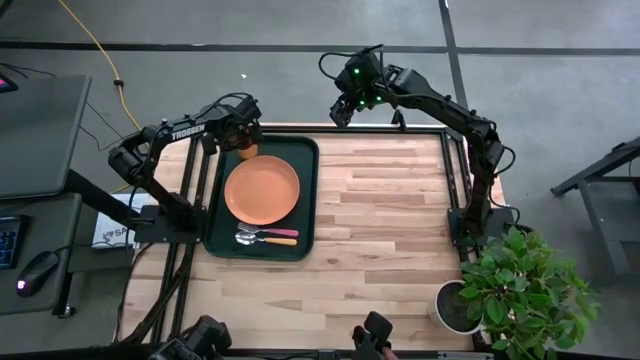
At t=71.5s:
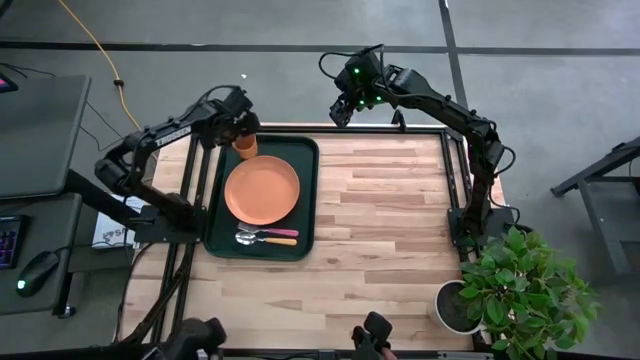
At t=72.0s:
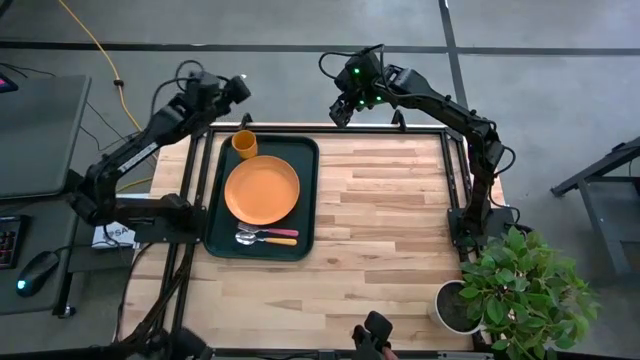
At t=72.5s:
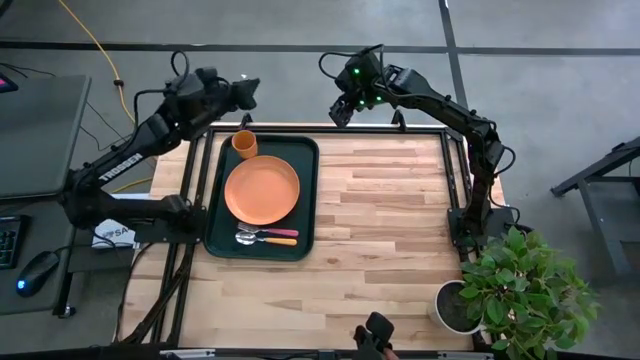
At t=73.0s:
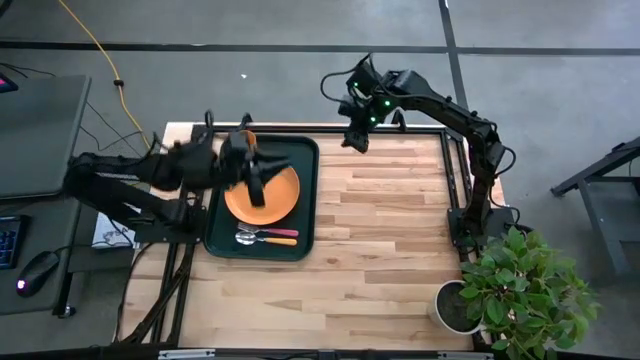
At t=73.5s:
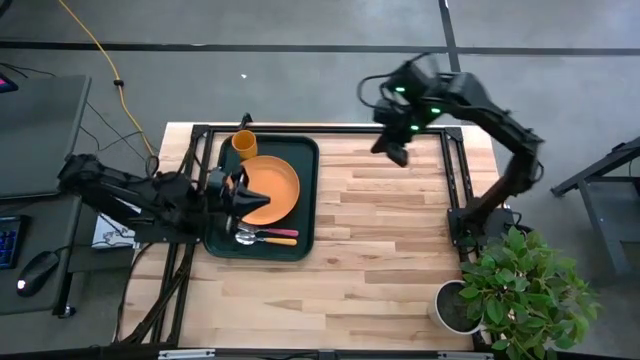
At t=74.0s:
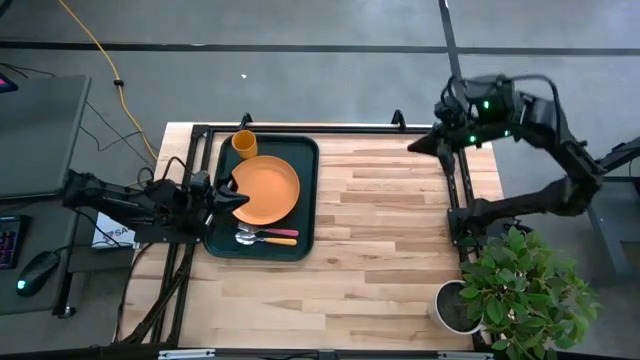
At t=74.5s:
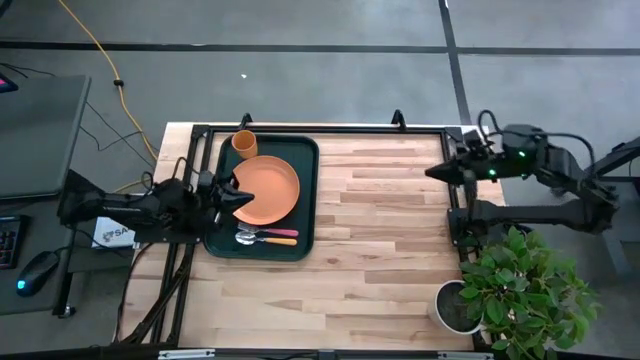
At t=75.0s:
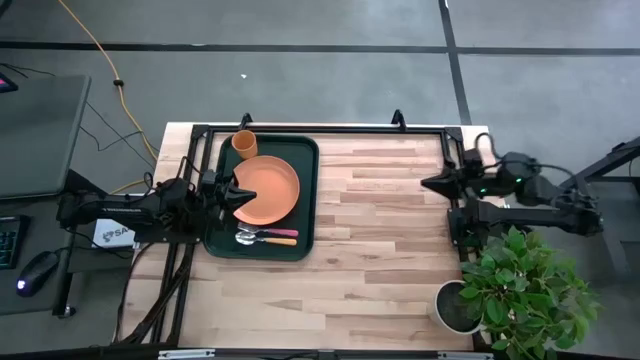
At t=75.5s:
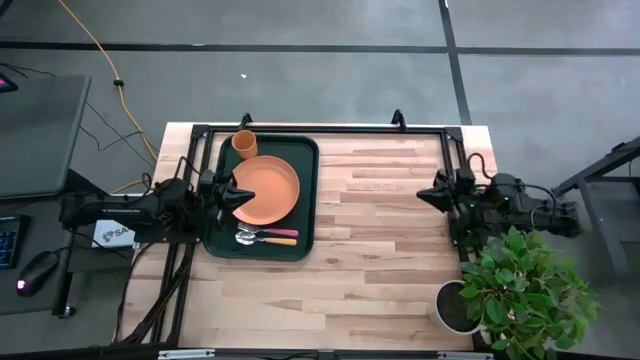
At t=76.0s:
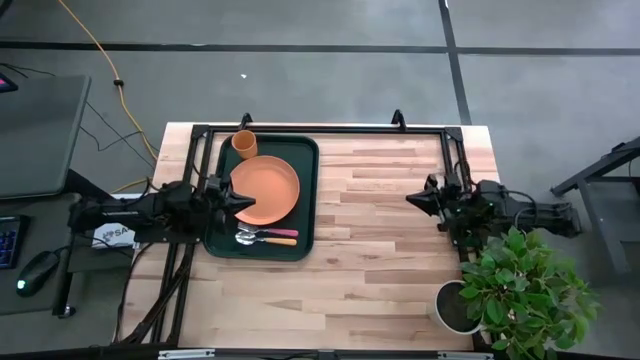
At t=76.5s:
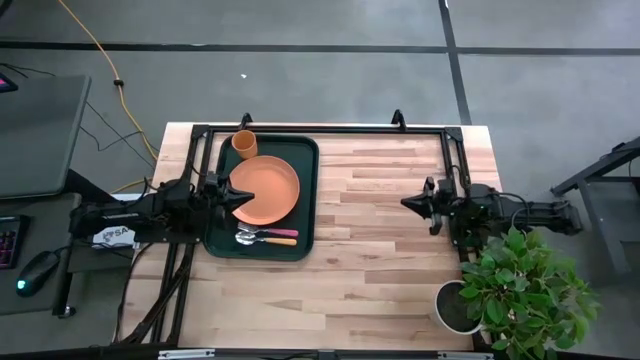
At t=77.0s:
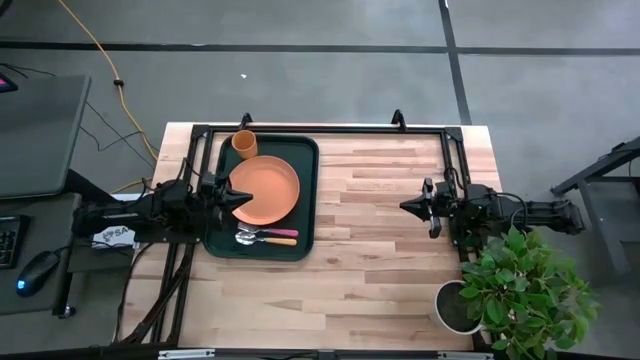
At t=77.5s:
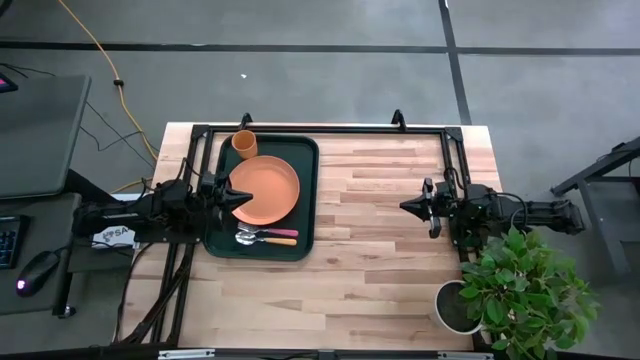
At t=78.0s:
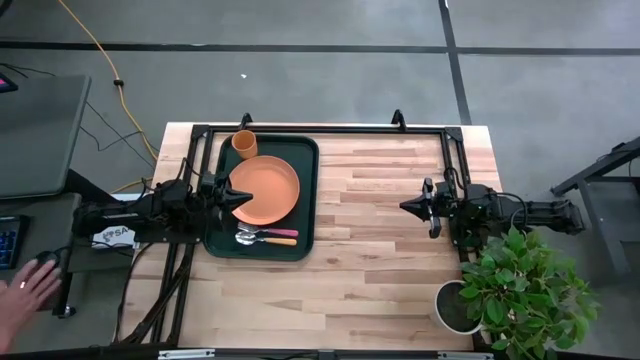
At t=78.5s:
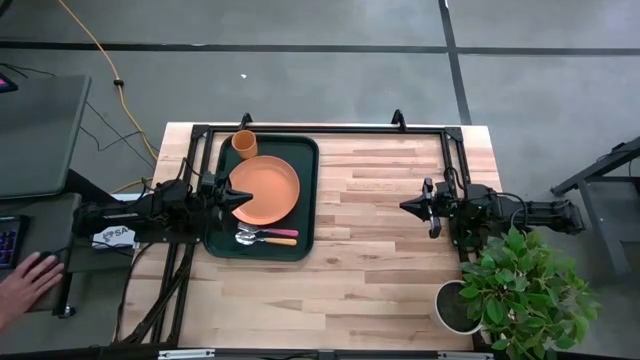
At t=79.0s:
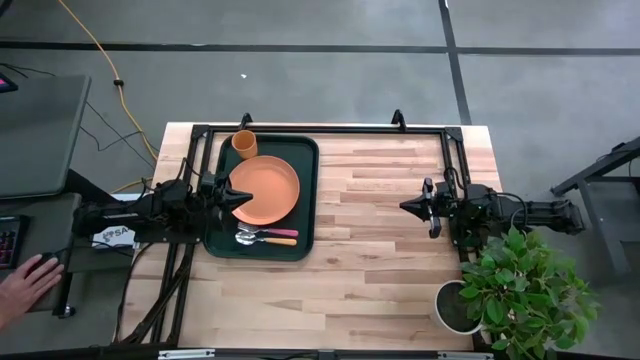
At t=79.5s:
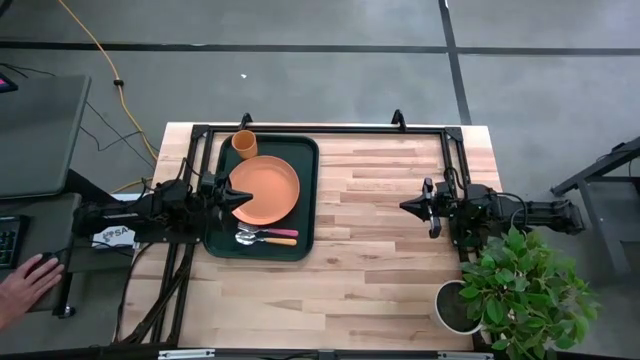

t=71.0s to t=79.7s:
Task: Pick and place plate/cup/fork/spoon on tray
Return to Home Position

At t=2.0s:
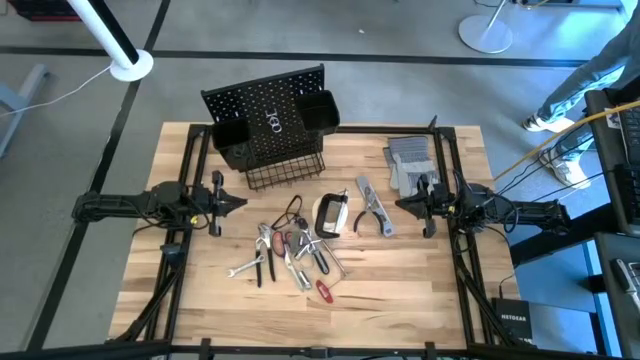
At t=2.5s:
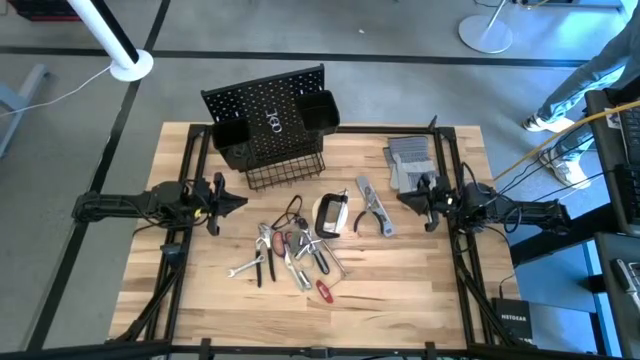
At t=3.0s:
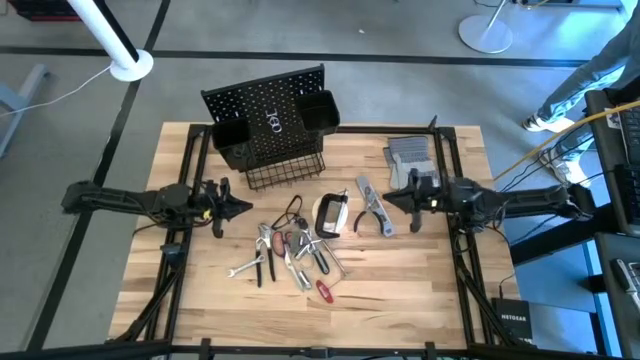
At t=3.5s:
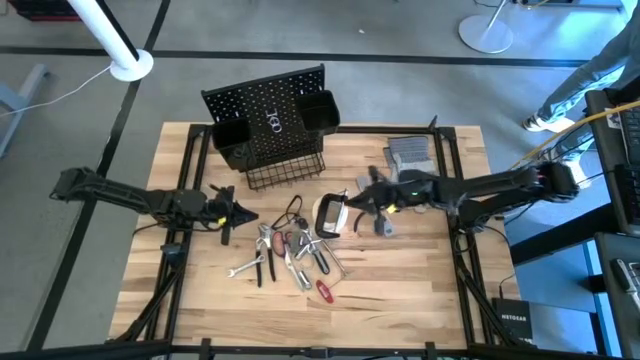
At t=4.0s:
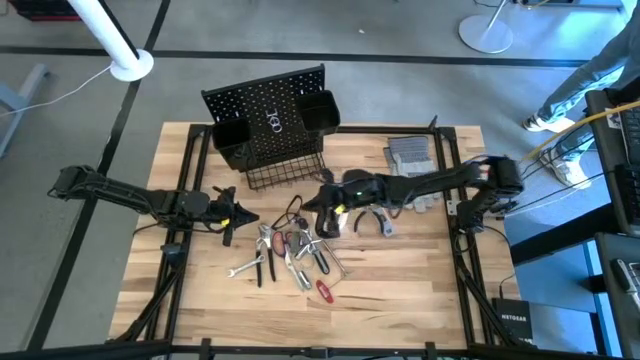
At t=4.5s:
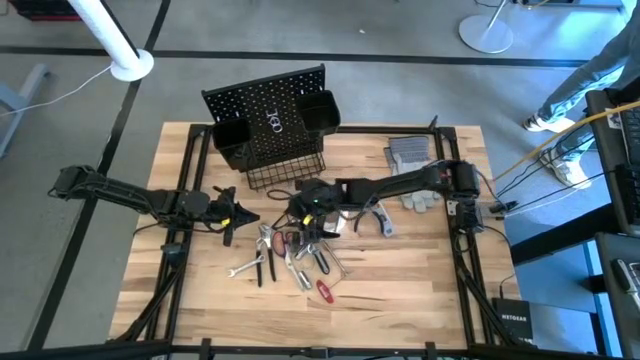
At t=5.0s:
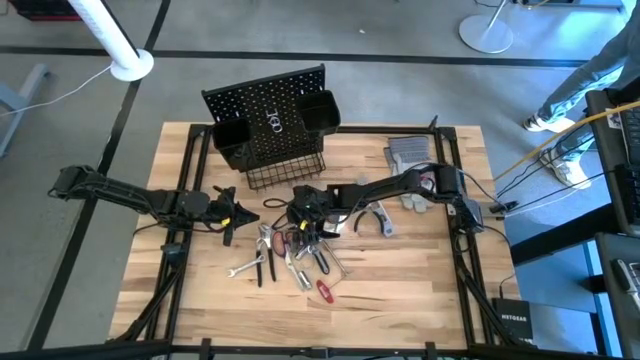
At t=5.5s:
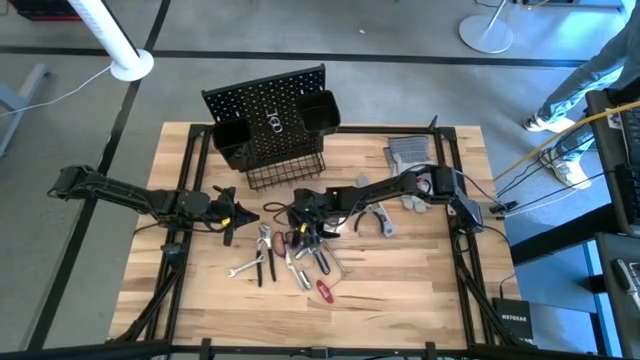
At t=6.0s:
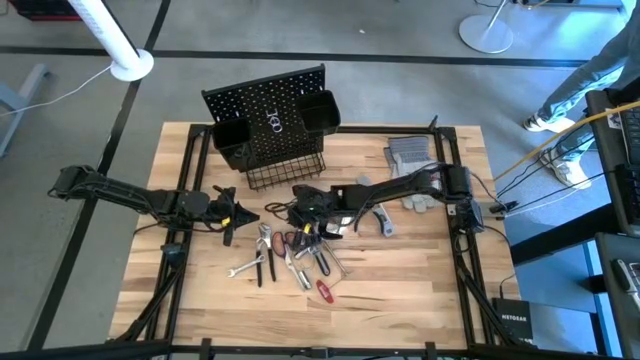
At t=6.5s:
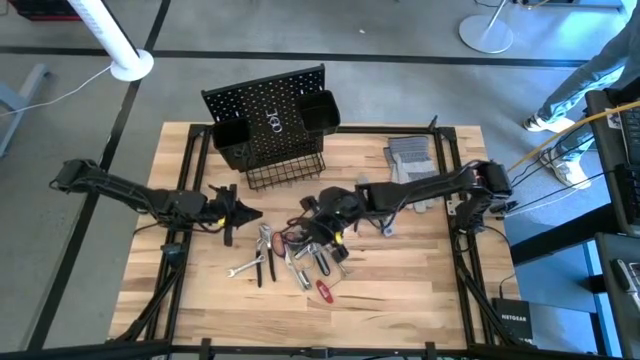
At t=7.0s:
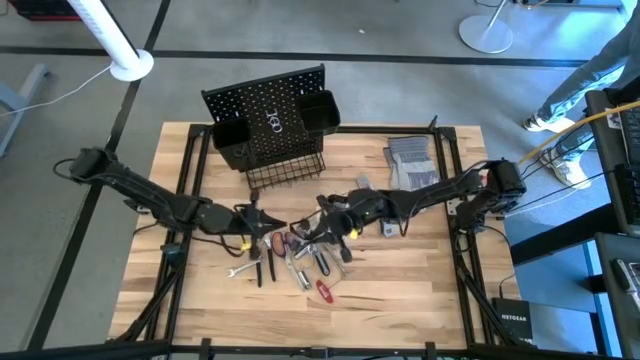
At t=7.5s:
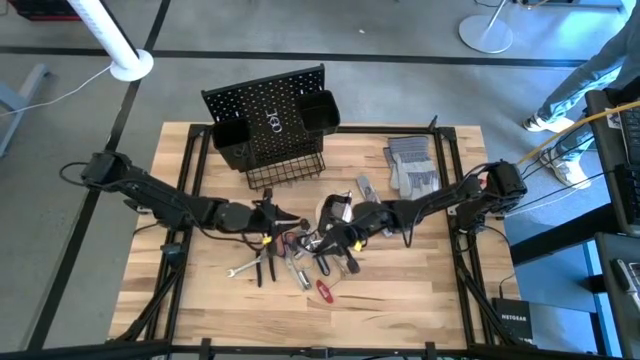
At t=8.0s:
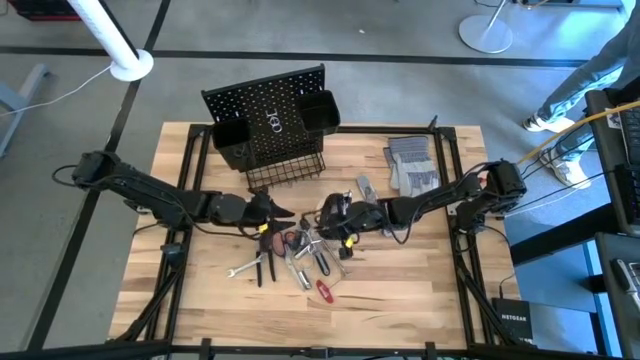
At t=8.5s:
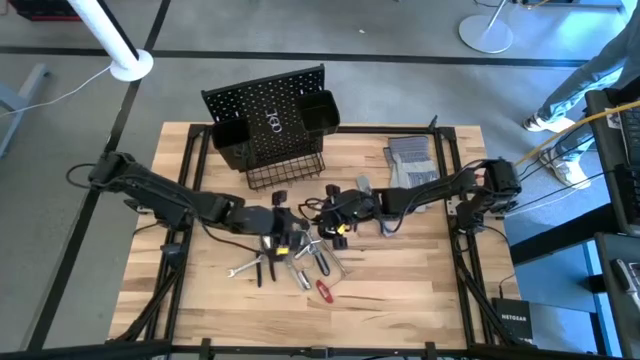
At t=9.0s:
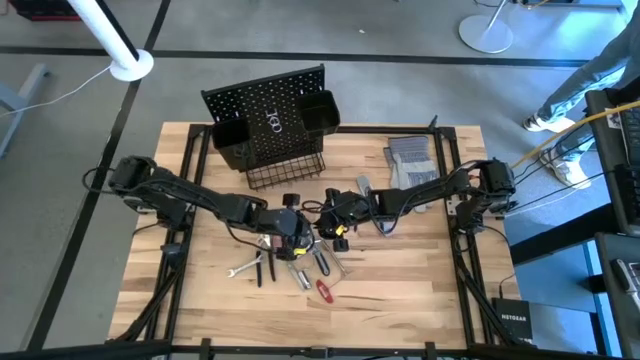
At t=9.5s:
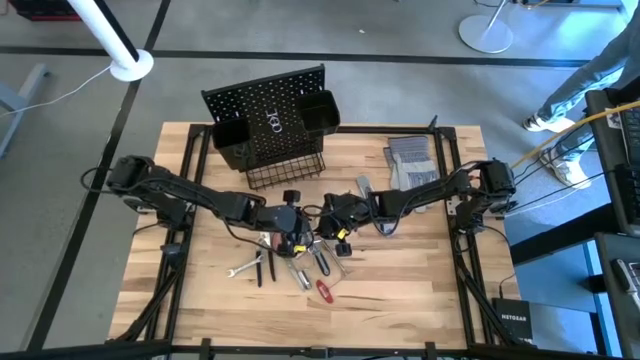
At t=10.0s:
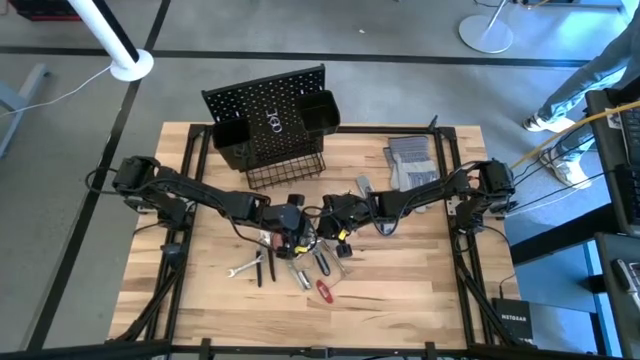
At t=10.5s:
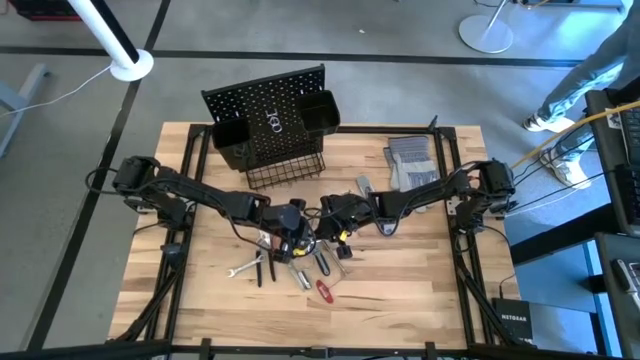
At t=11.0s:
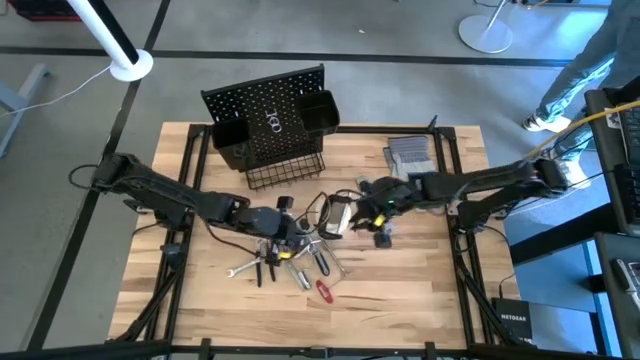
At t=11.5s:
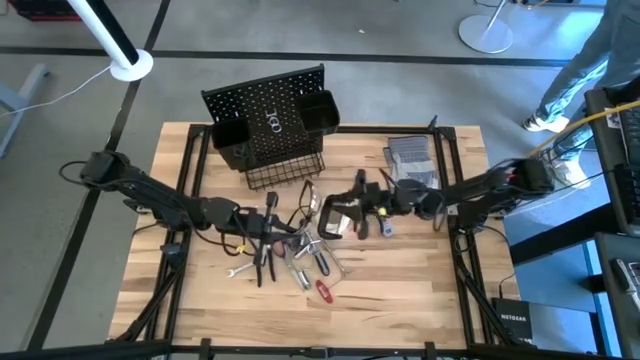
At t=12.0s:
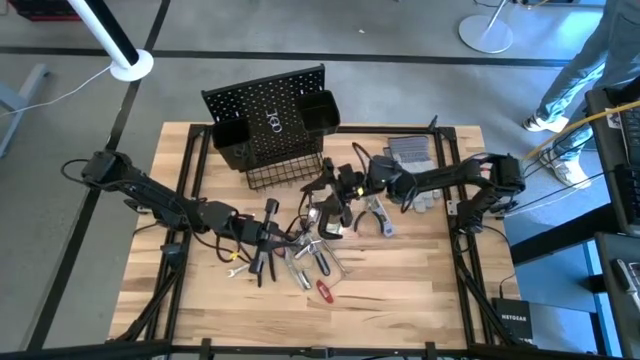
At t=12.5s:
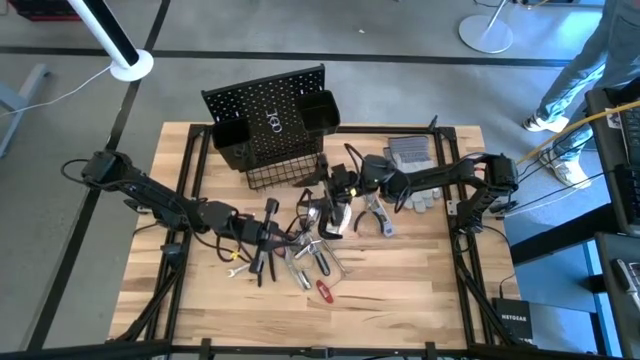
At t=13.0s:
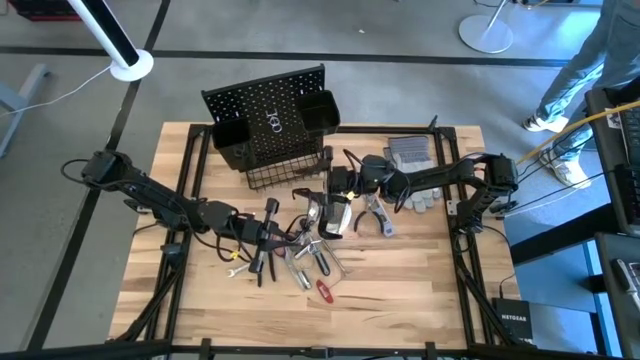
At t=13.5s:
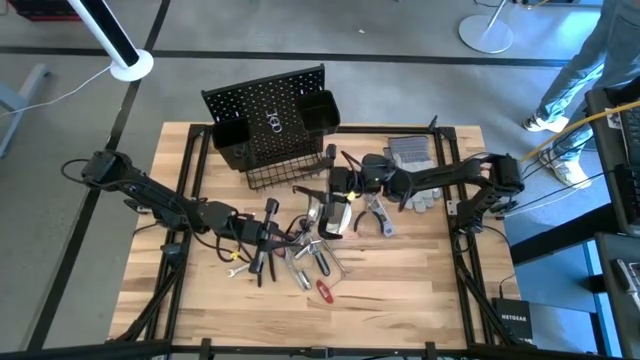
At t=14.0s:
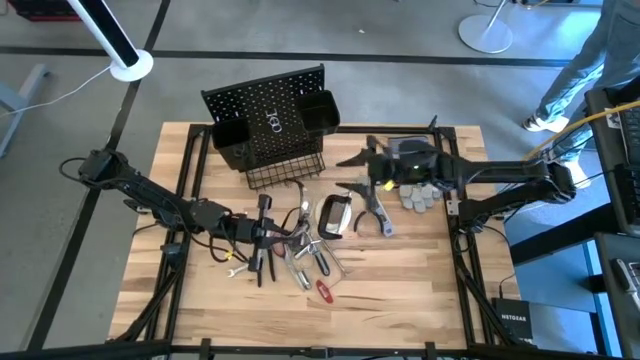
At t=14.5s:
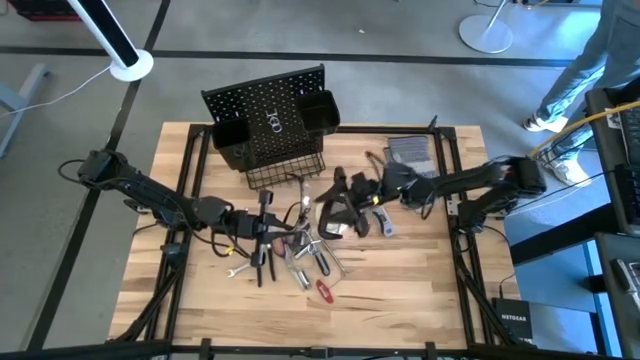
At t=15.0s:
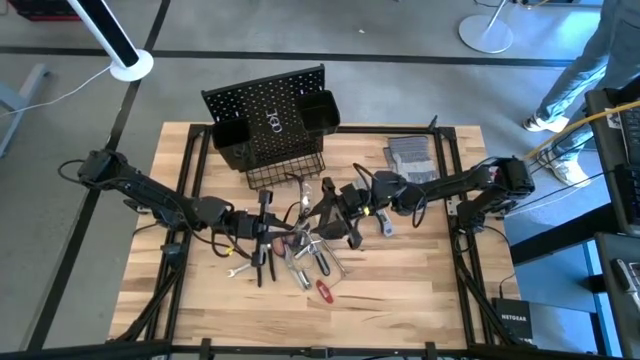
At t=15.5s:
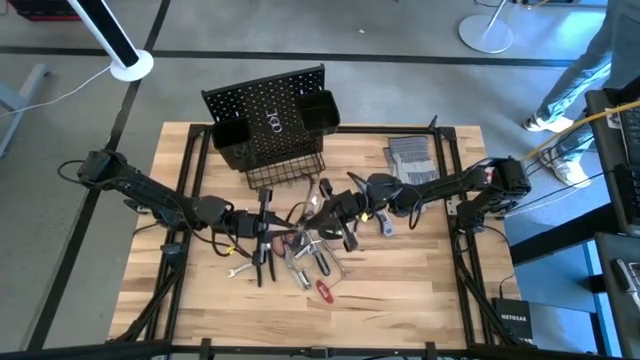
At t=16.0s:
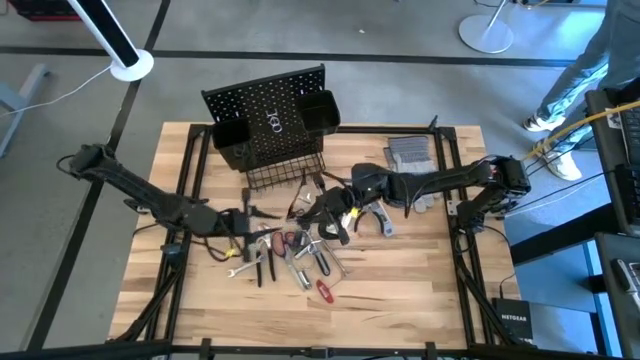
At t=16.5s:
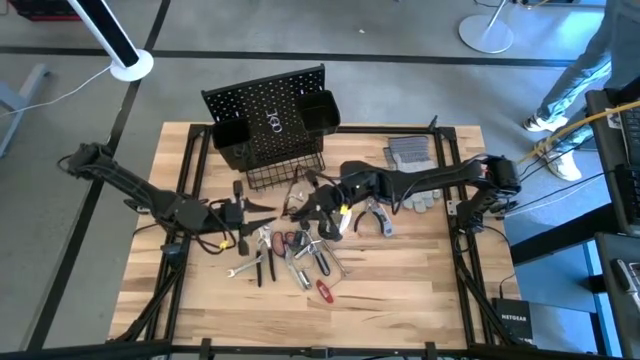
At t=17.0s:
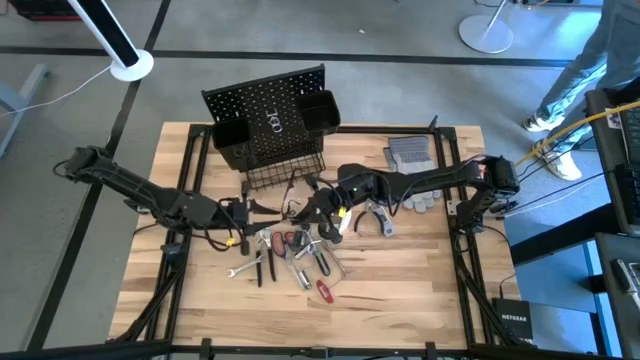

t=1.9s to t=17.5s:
Task: Hang tools onto peg board
Hang the safety glasses on the pegboard
